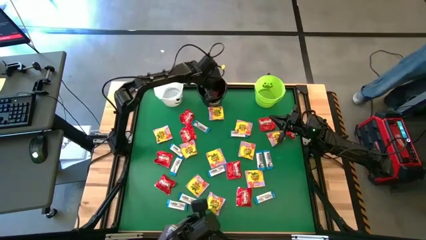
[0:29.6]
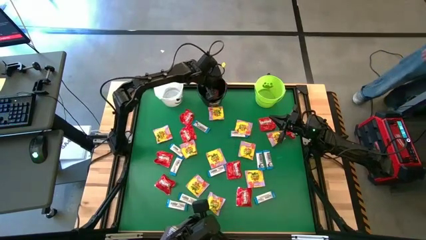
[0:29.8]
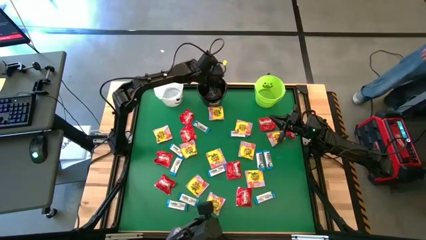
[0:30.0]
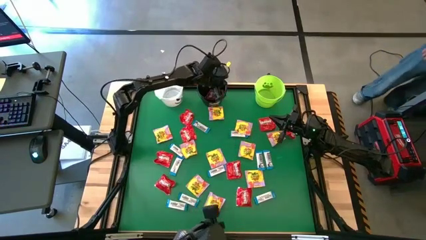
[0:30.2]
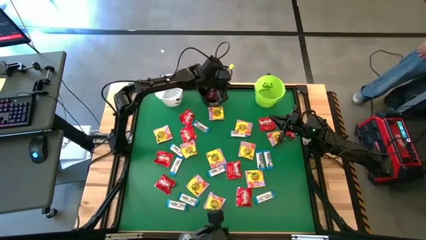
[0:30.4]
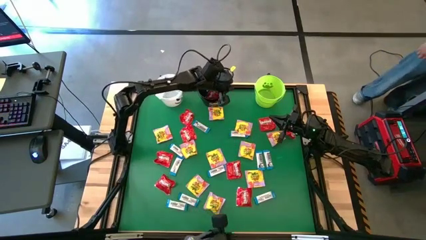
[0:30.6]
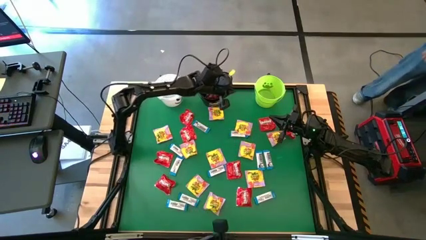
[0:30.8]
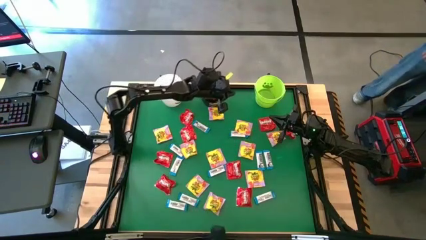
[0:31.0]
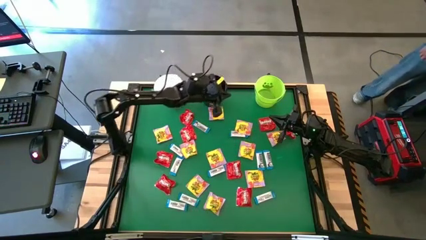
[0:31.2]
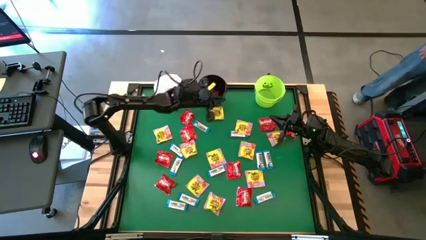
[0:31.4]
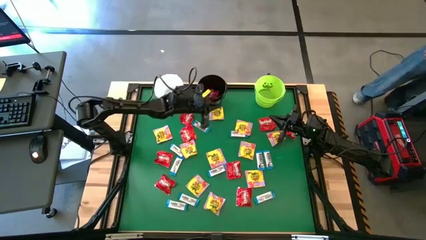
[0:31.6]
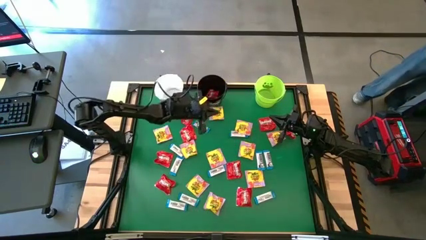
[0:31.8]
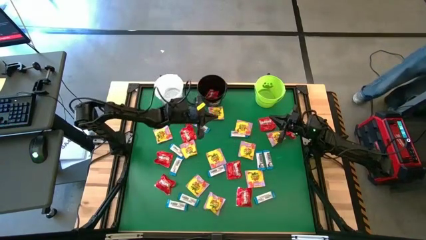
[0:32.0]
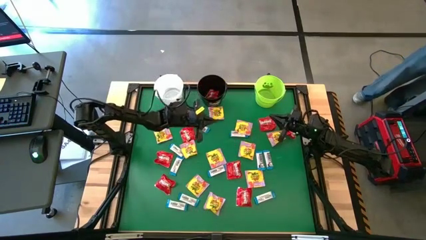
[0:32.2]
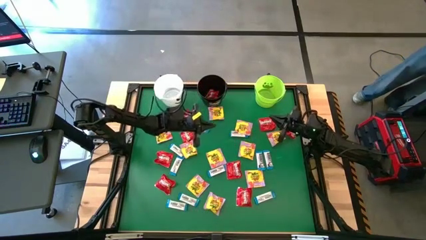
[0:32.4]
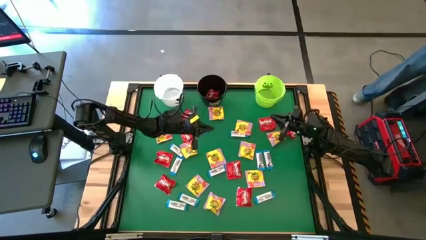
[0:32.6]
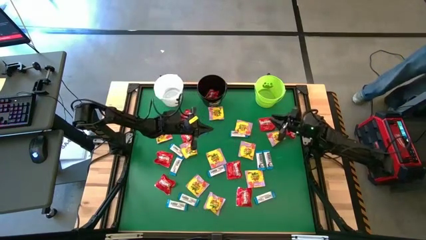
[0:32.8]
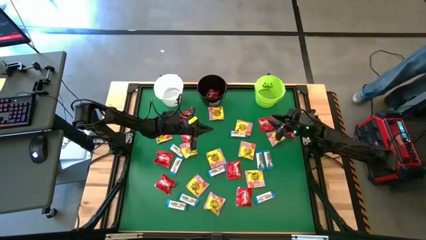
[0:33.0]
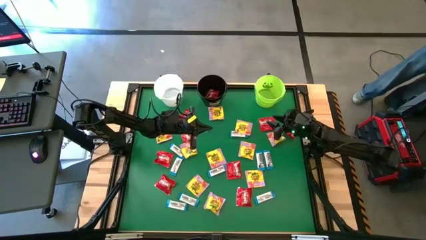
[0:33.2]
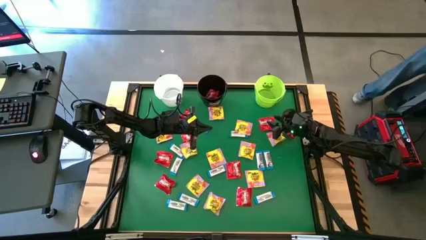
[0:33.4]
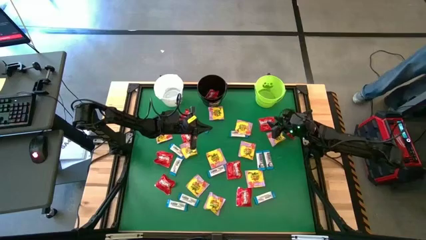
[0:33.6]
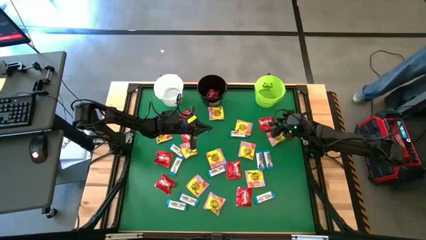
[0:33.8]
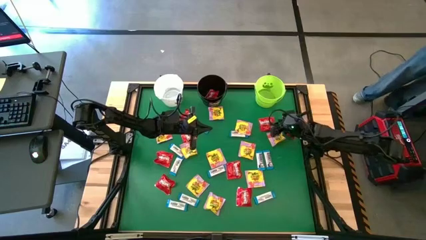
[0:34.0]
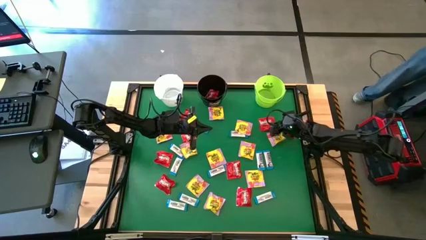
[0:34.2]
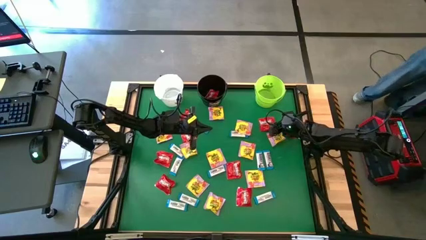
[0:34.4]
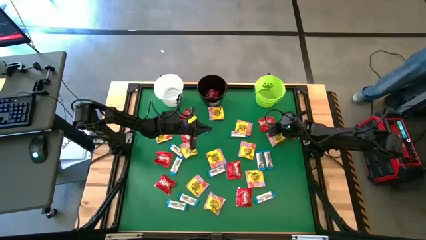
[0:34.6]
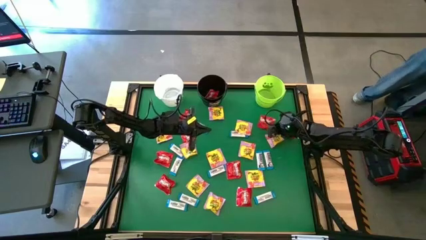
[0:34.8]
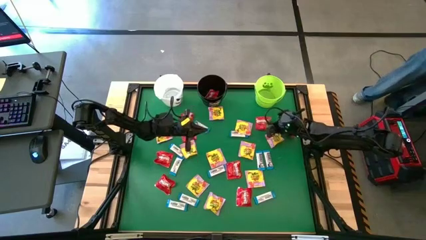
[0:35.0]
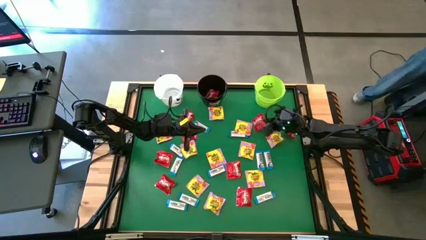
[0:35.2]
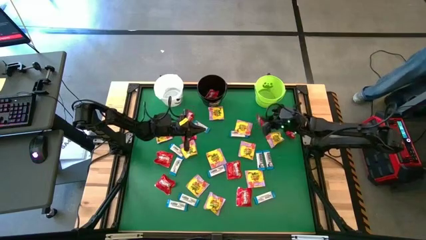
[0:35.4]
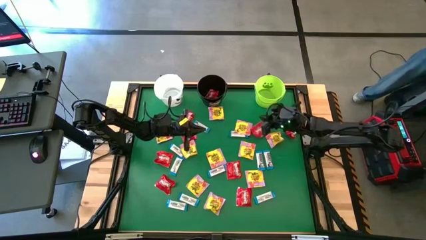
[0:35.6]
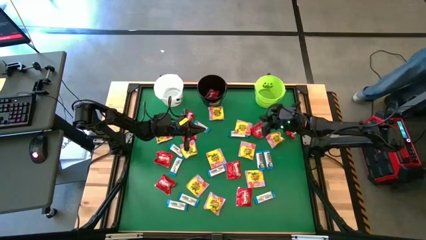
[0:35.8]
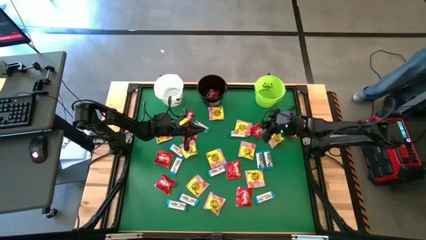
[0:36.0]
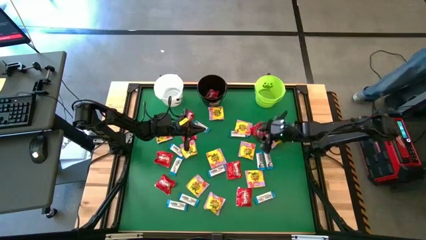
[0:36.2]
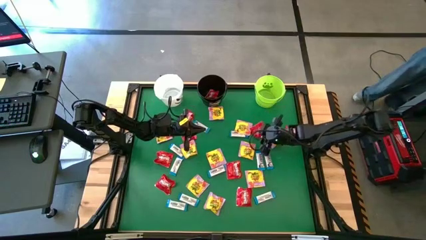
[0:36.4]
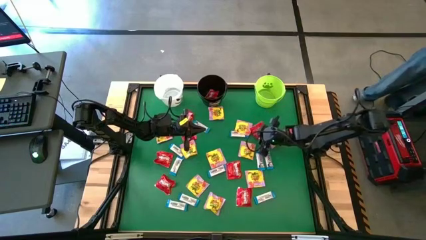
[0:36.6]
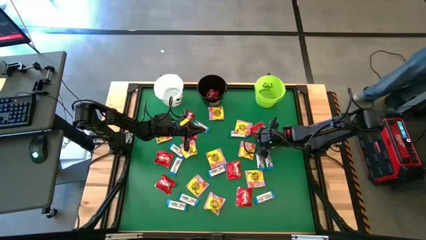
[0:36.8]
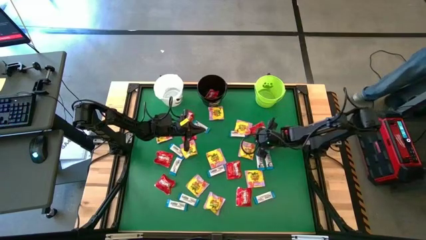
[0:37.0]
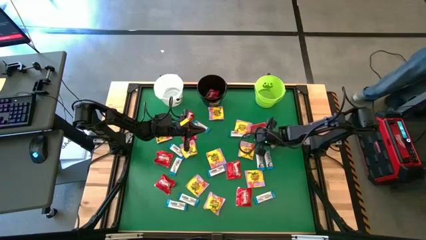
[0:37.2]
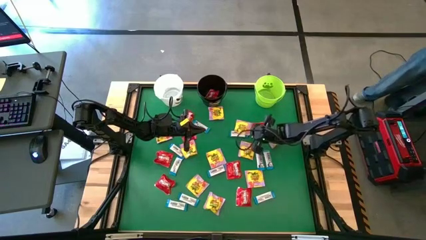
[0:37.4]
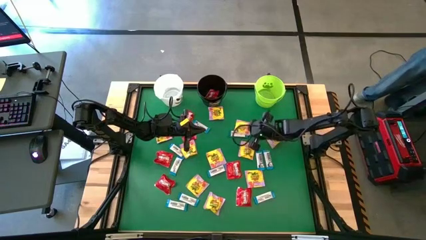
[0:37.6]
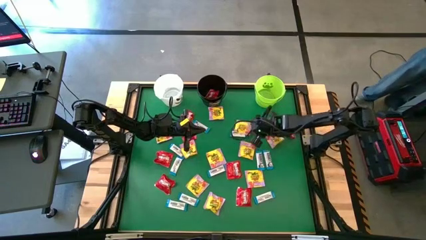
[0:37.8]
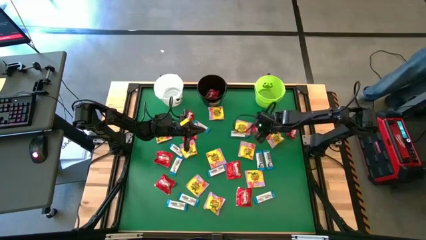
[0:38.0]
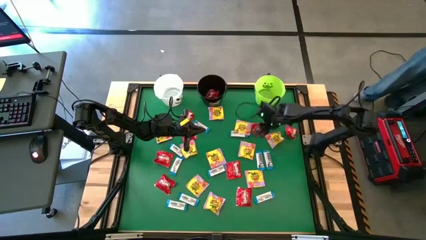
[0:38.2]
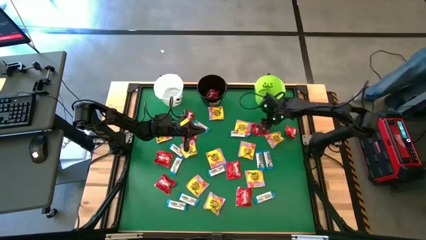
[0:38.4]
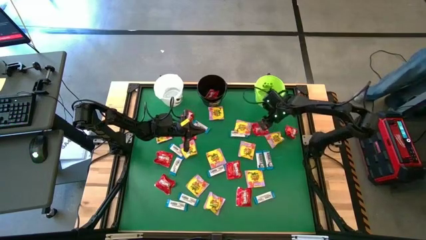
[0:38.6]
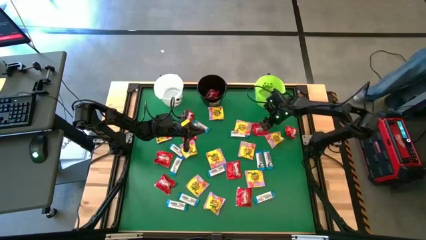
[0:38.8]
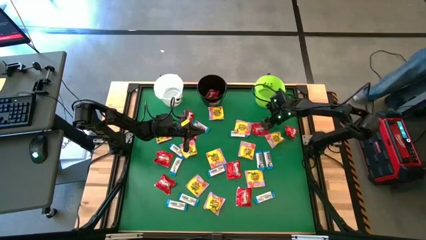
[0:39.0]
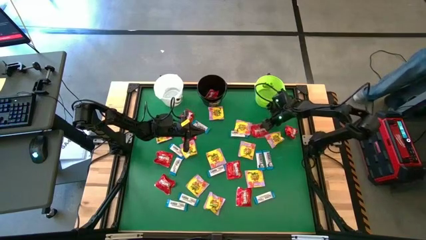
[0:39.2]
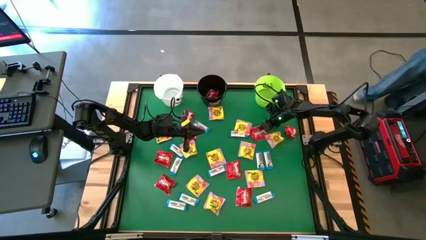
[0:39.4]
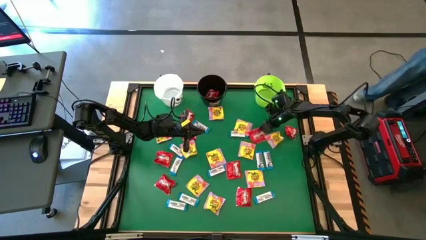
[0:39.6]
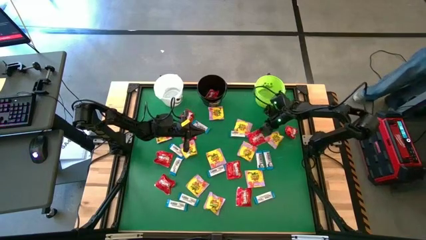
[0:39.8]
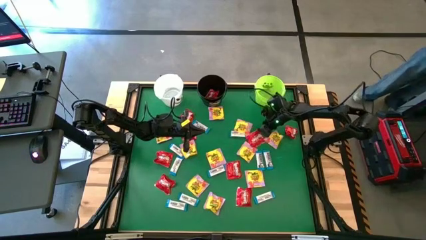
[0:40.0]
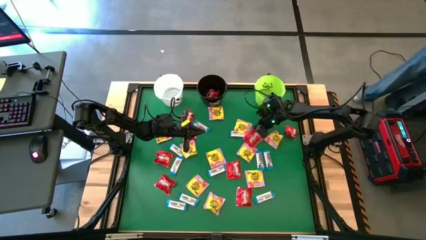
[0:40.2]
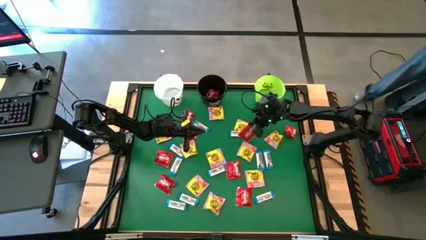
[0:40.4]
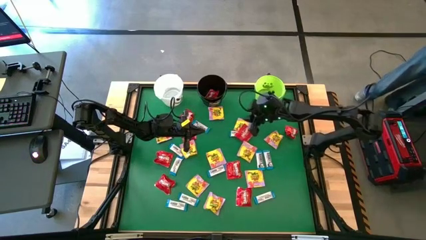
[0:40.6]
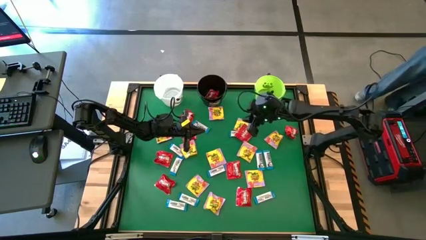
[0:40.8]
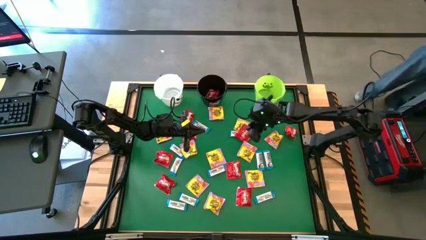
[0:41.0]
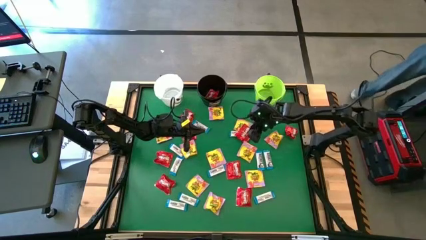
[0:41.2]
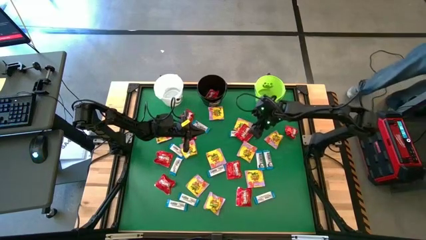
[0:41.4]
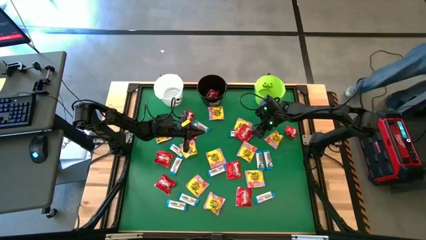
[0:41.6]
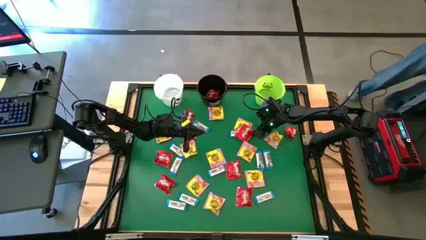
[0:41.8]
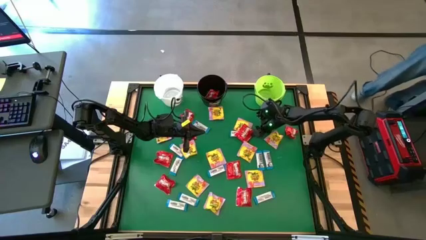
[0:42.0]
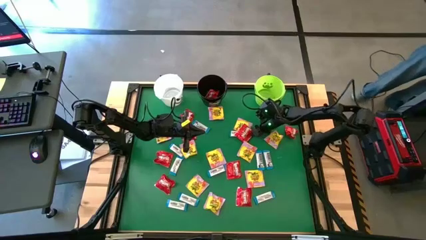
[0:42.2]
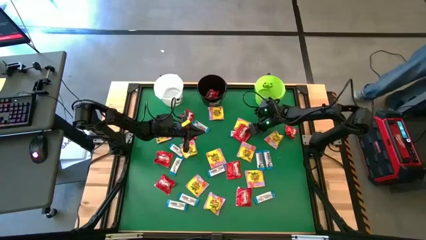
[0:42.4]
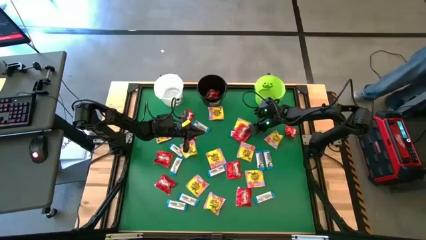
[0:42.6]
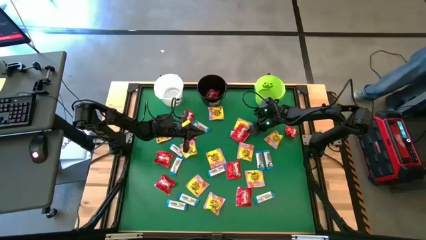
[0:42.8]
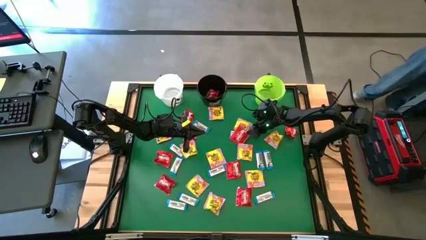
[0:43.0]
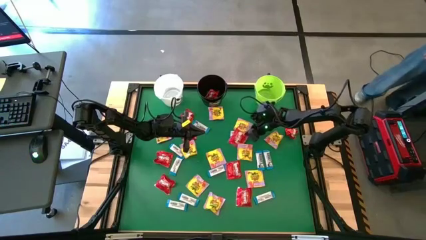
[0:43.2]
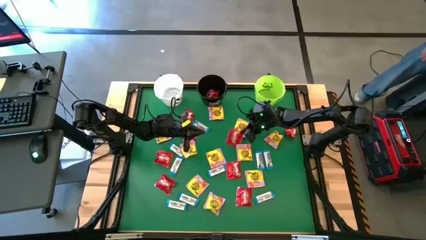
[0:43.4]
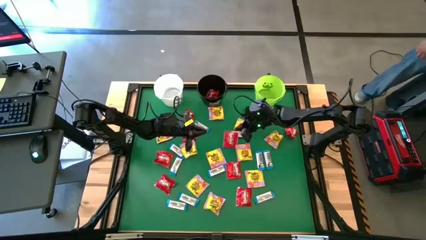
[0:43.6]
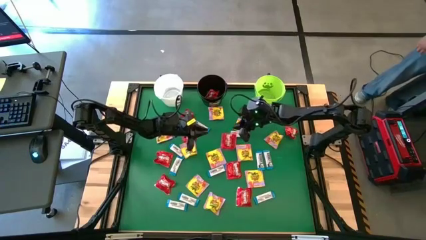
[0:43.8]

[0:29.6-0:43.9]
Task: Sort candy by brand, put in halloween buckets
Put the red candy into the black bucket

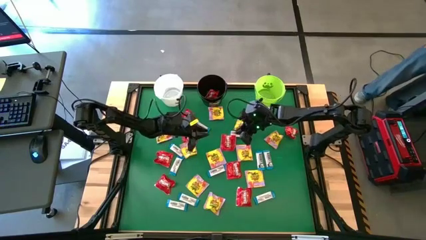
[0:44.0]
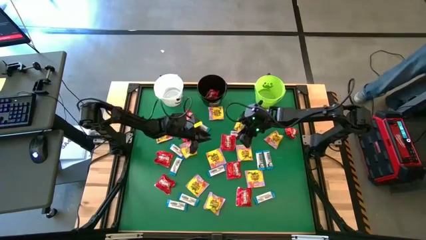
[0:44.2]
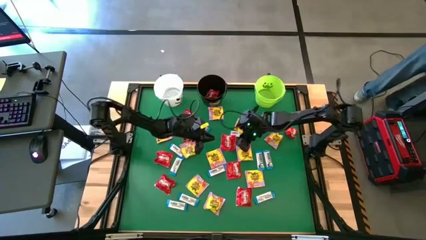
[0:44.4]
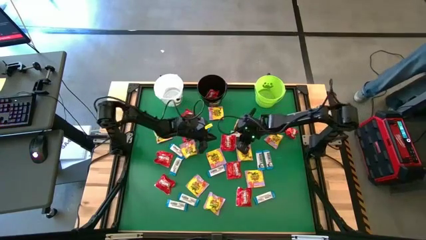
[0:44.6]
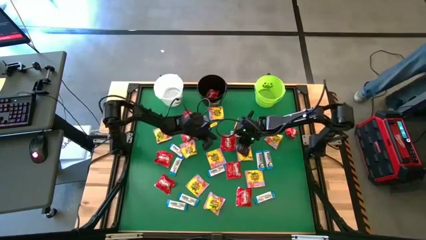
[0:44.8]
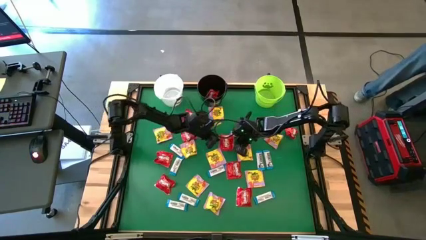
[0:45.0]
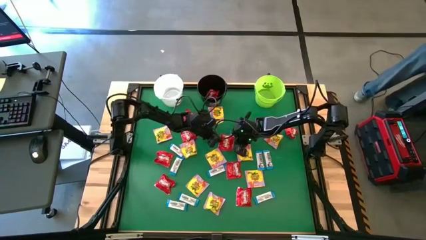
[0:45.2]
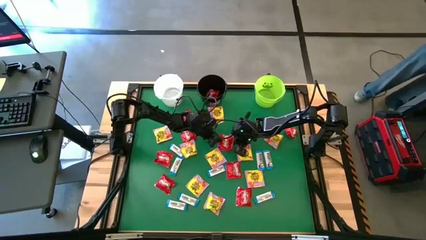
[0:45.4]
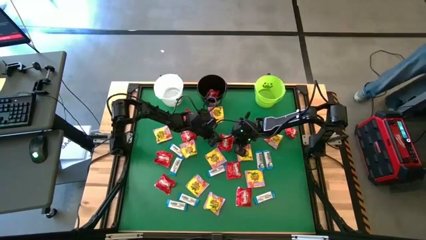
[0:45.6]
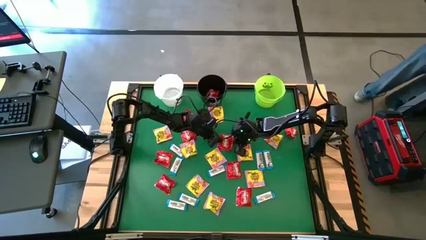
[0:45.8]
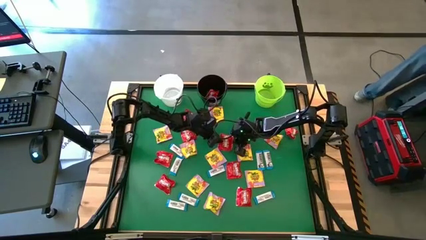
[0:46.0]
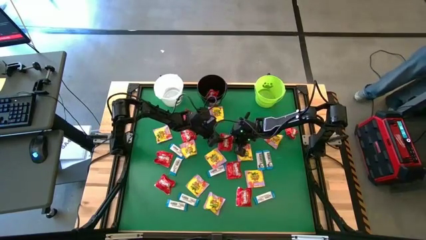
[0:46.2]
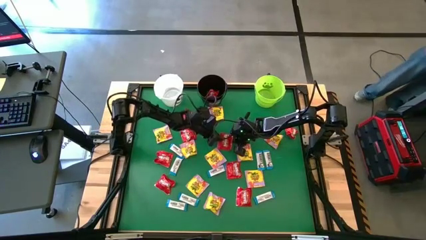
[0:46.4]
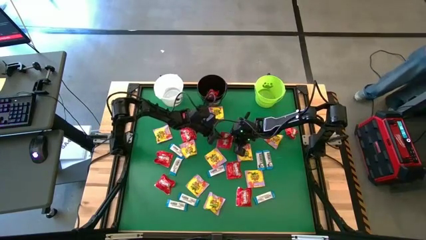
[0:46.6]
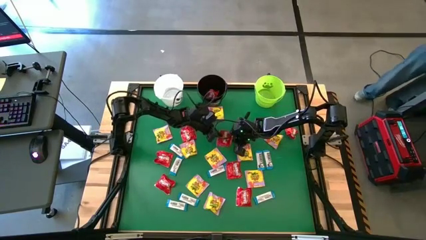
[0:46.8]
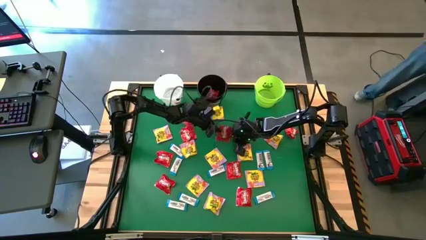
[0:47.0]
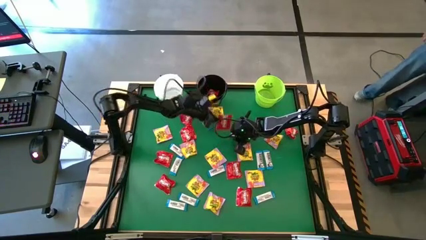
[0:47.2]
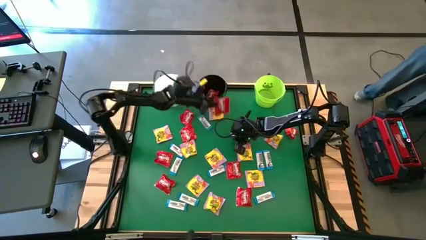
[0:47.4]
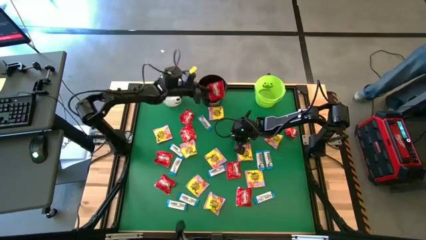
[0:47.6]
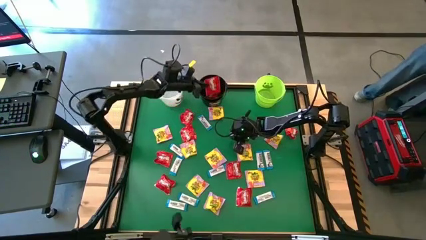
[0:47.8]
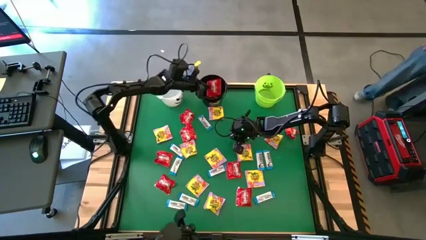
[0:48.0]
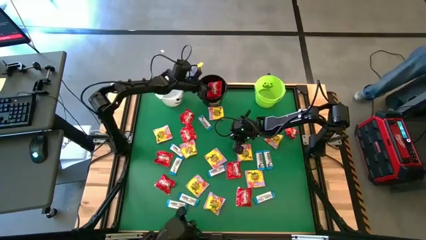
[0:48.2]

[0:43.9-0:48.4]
Put the red candy into the black bucket
